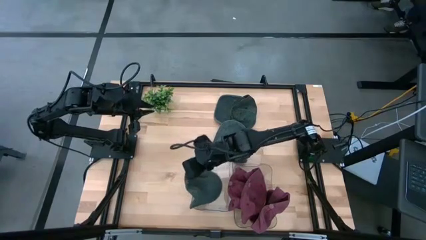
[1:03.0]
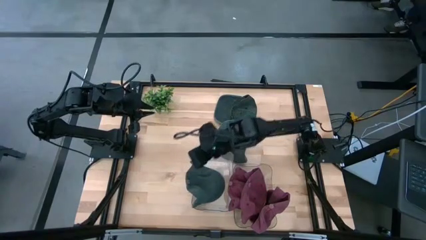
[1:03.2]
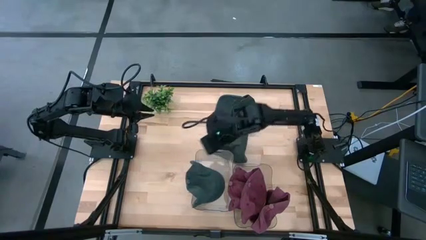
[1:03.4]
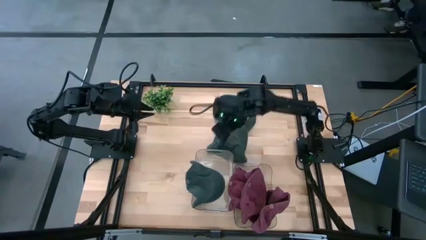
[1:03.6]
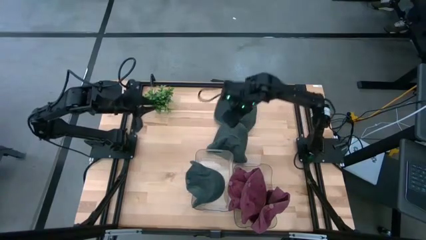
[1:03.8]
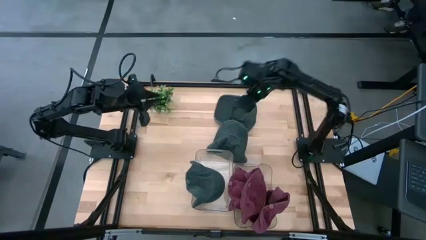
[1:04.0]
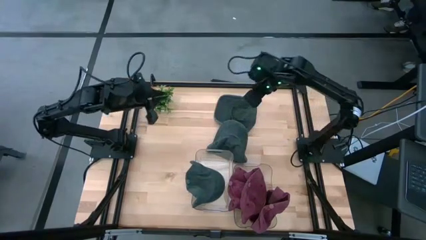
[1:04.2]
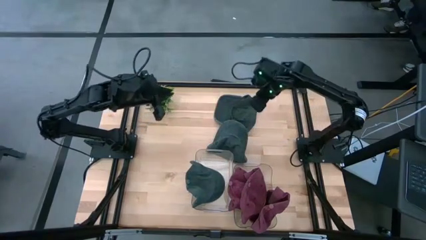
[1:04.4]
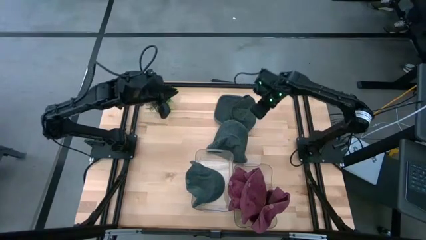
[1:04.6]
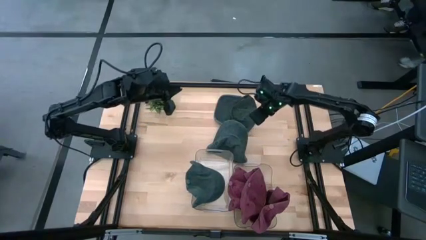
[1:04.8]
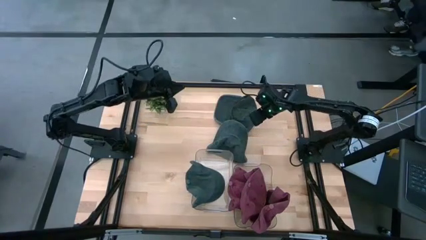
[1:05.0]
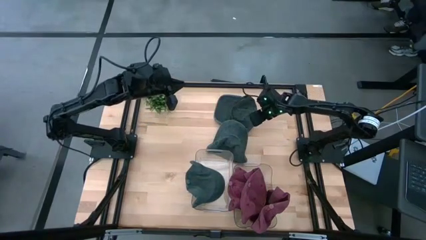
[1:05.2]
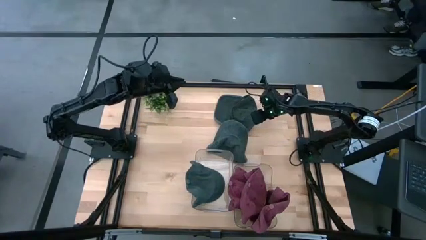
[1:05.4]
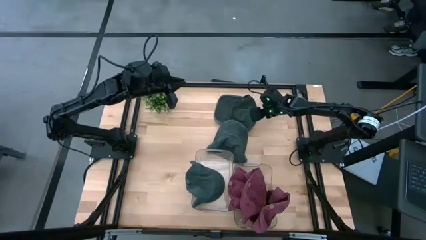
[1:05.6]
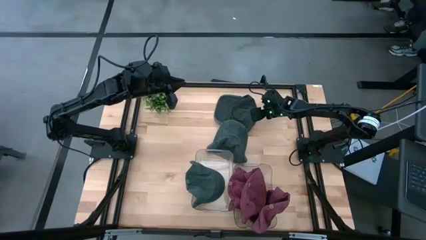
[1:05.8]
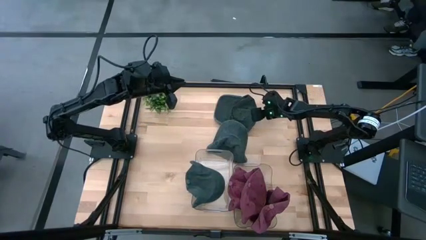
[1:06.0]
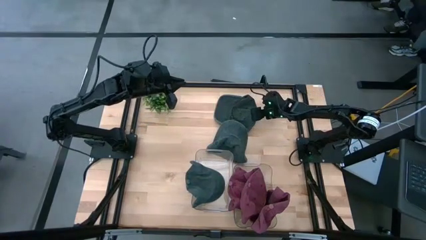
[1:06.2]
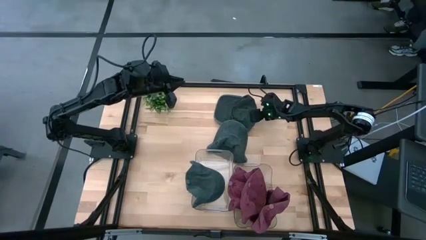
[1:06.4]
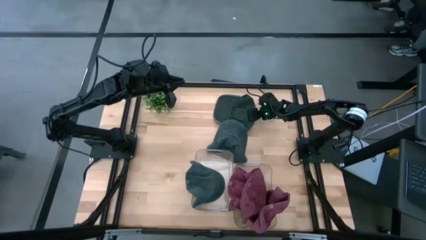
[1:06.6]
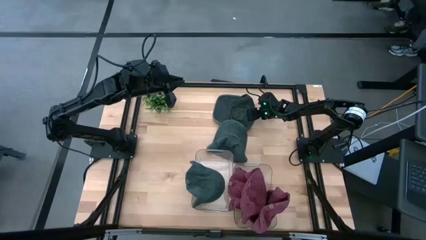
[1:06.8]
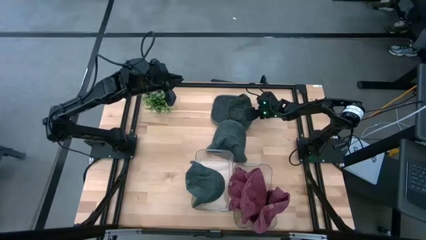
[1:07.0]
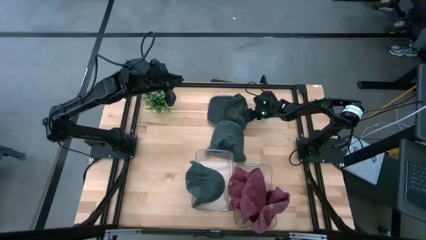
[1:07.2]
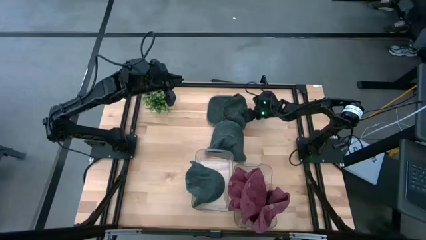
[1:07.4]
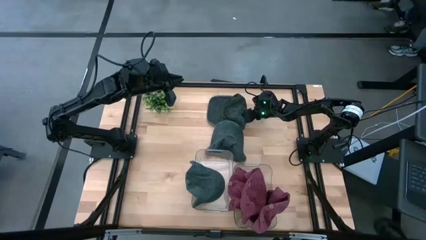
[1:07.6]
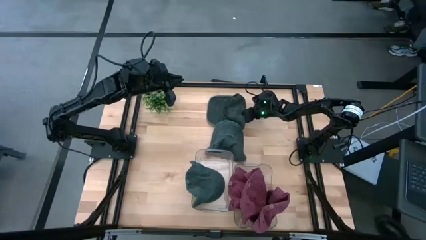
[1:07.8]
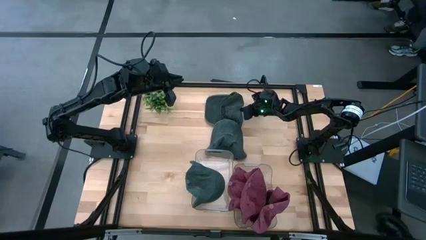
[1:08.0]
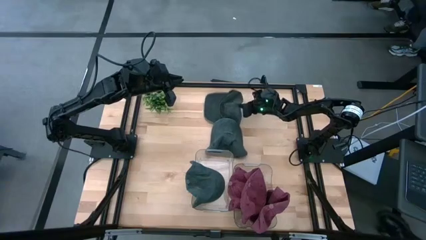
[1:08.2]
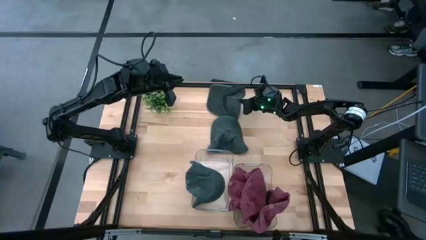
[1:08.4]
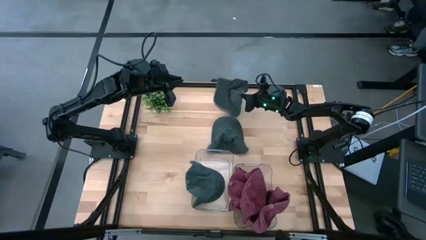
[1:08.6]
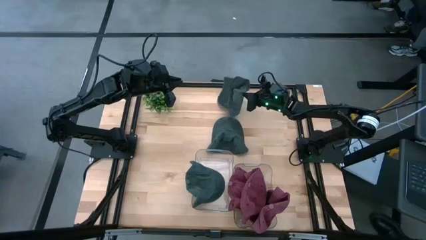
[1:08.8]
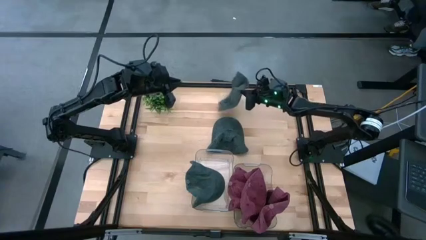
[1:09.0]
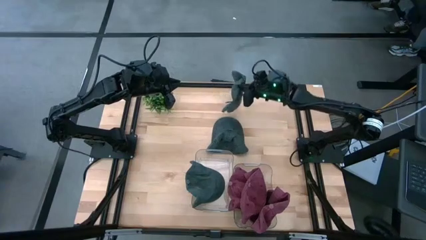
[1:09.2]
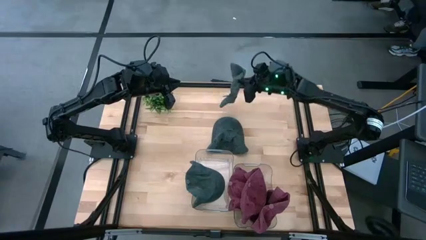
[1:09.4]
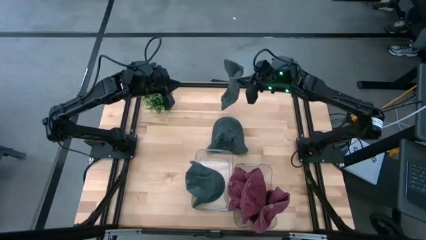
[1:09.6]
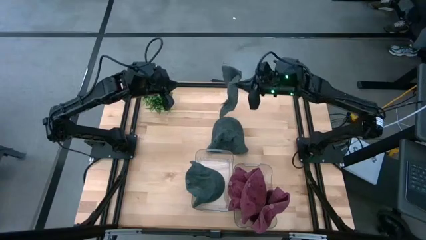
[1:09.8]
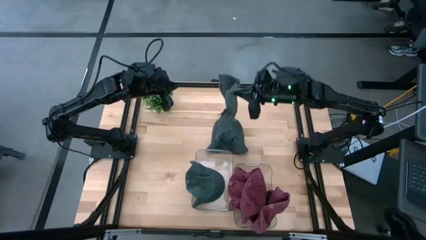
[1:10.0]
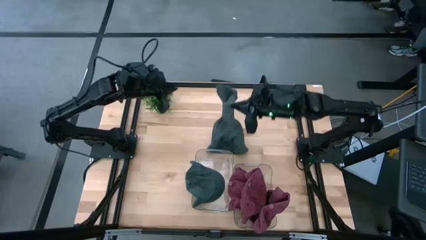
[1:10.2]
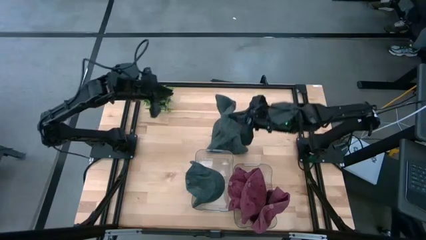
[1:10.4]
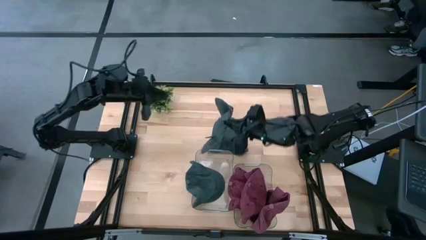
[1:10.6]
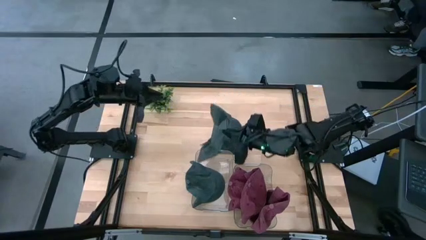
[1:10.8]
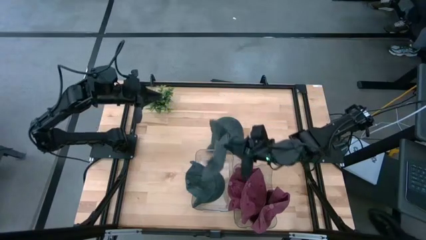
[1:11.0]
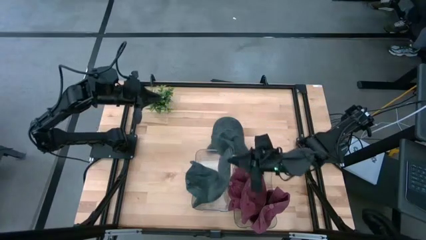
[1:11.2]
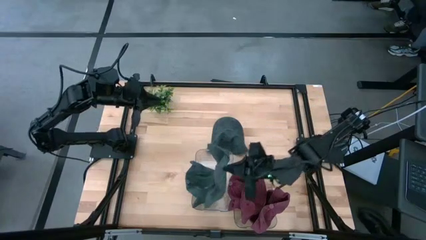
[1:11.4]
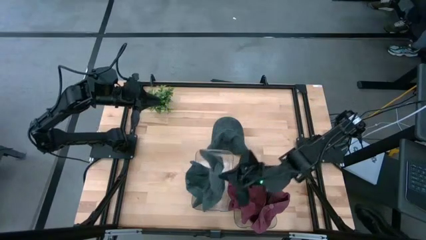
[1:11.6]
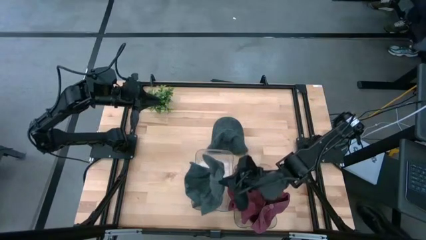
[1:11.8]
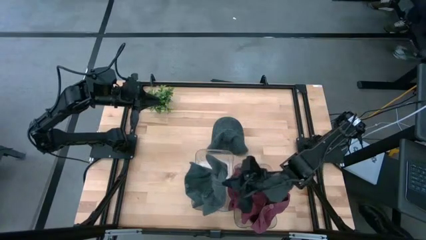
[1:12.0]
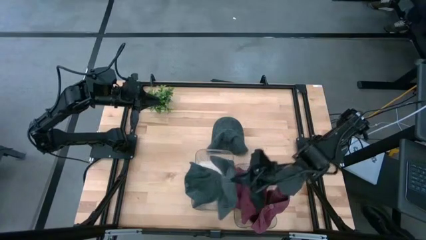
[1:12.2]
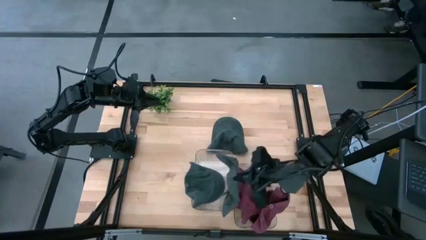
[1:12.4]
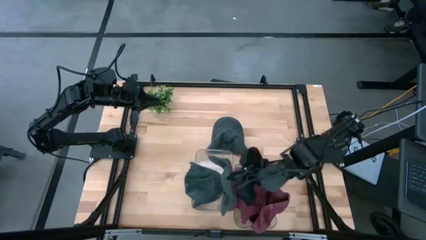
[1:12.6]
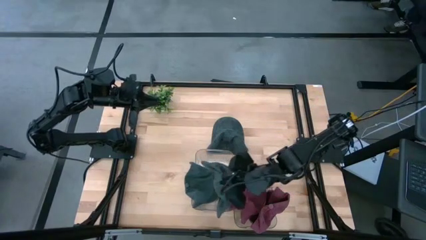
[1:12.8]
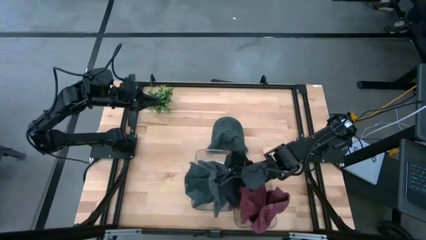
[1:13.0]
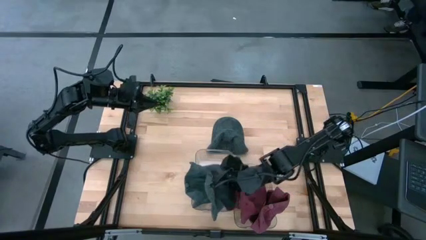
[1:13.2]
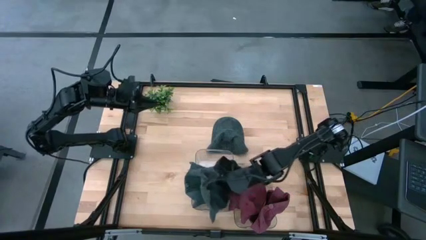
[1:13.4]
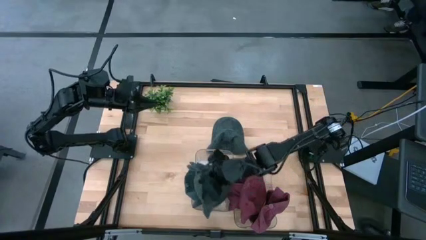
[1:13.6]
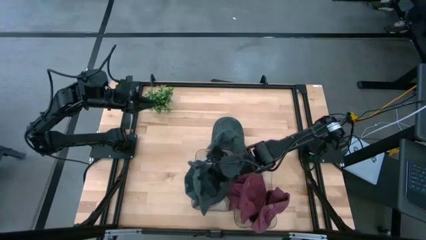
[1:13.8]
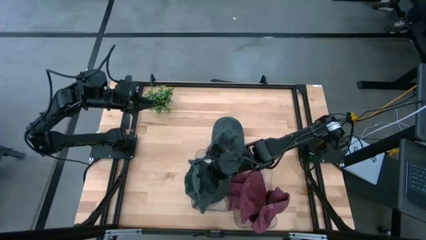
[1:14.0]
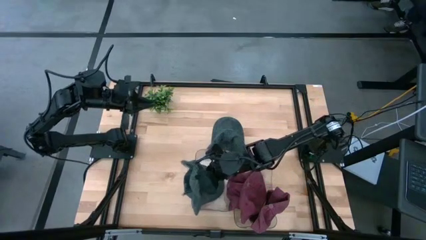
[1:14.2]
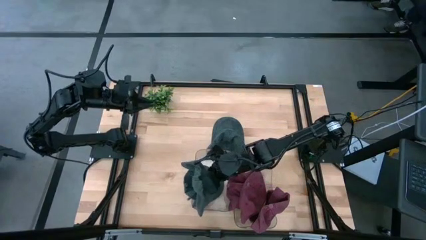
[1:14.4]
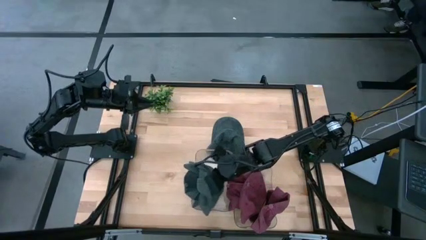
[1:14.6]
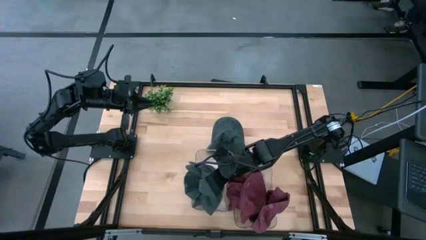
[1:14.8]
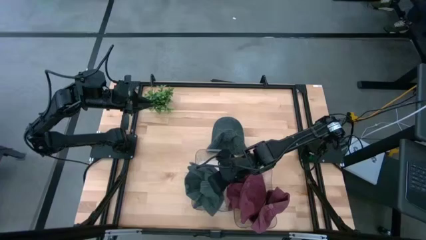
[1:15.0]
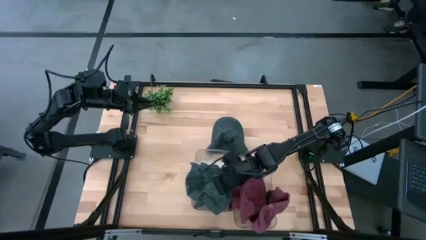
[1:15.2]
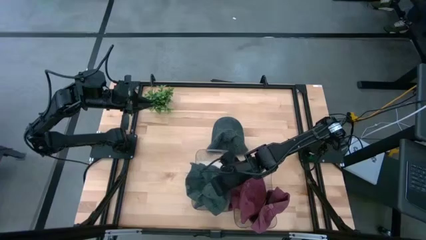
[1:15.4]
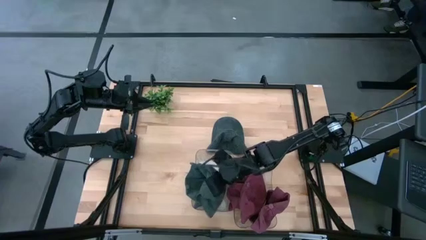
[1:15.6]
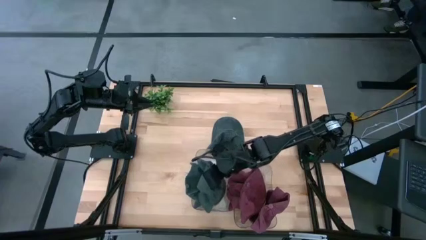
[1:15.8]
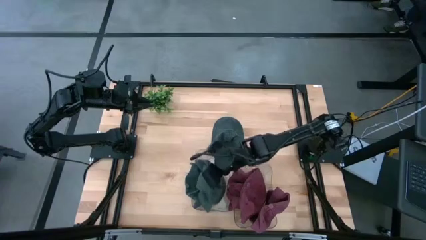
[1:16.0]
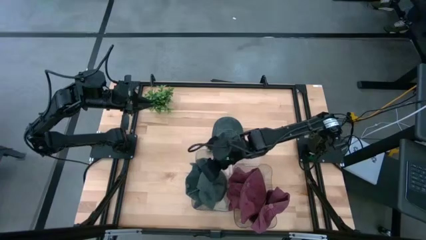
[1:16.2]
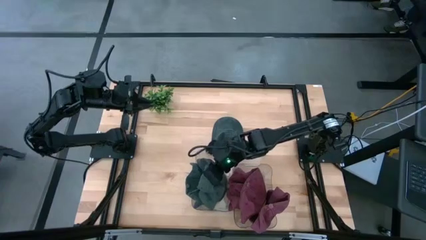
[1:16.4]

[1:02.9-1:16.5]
Task: Pick & Place hat
Put the top gray cap into the left transparent bin

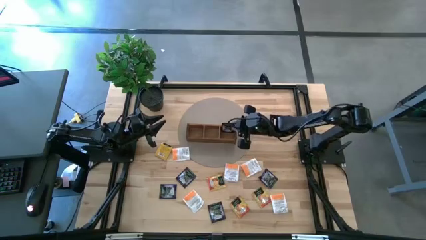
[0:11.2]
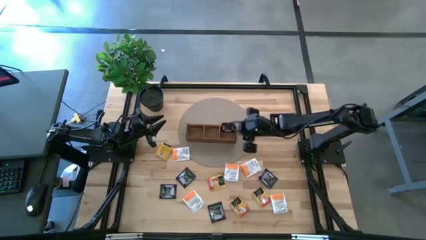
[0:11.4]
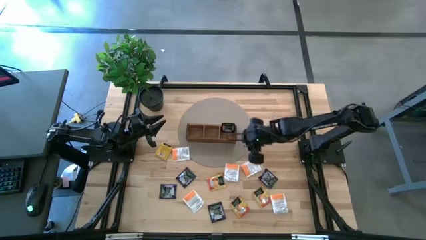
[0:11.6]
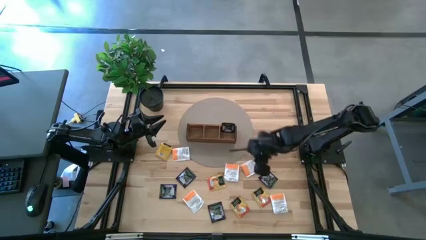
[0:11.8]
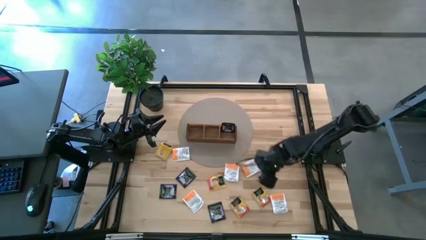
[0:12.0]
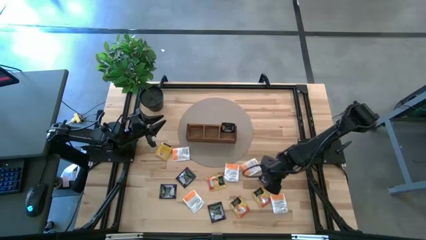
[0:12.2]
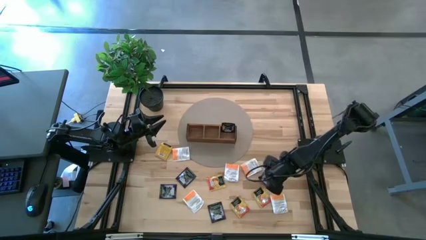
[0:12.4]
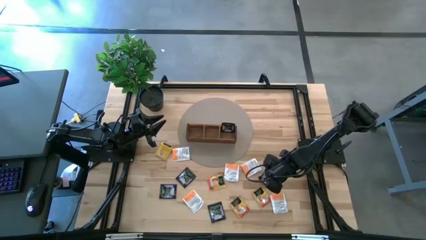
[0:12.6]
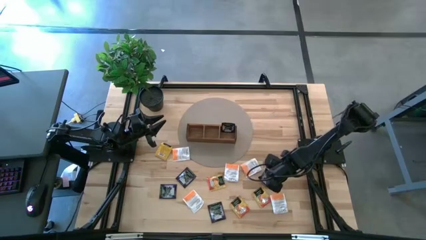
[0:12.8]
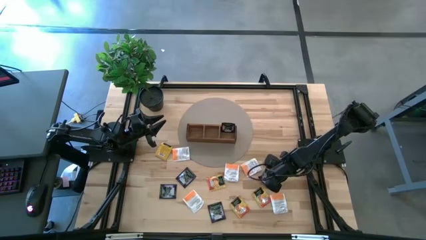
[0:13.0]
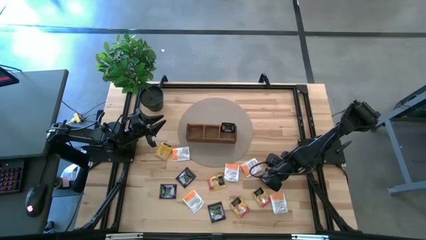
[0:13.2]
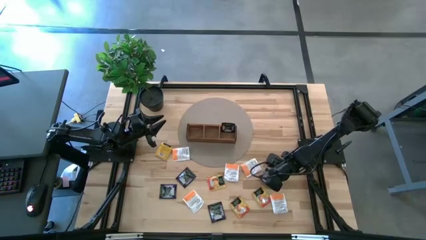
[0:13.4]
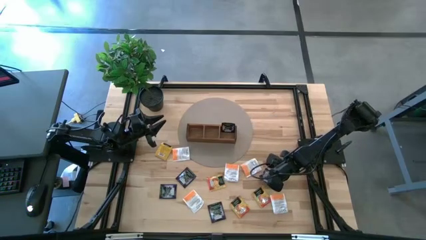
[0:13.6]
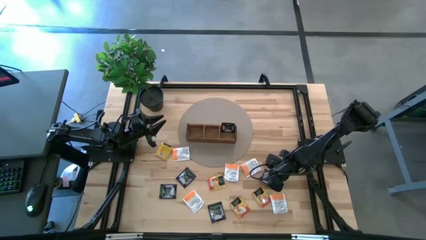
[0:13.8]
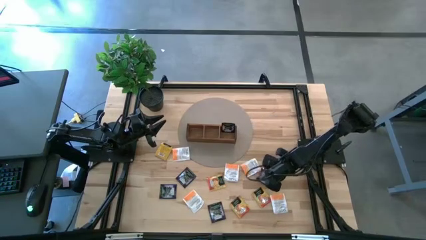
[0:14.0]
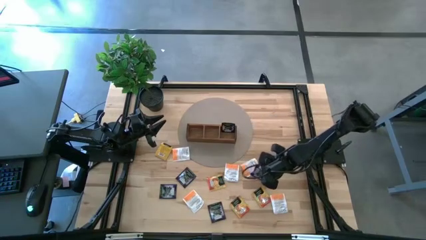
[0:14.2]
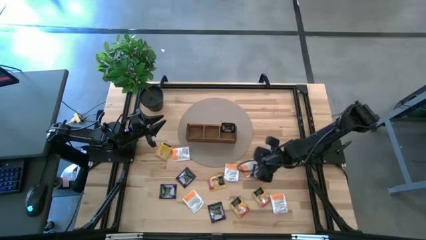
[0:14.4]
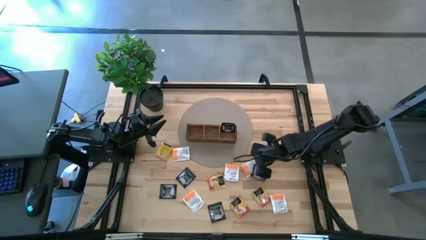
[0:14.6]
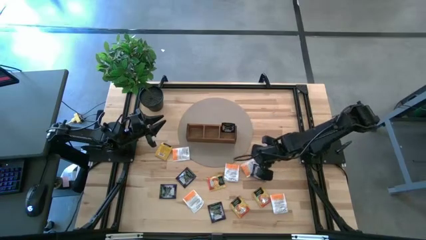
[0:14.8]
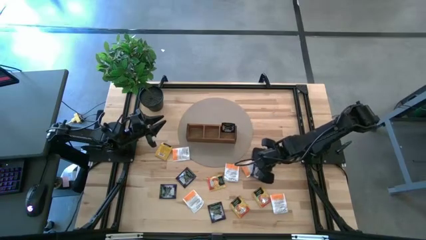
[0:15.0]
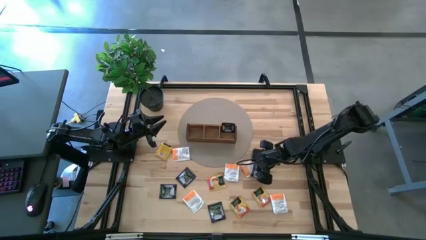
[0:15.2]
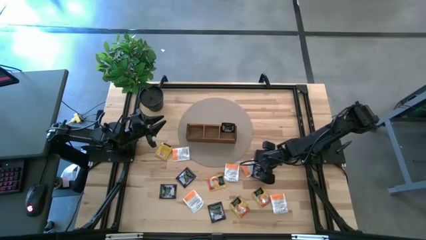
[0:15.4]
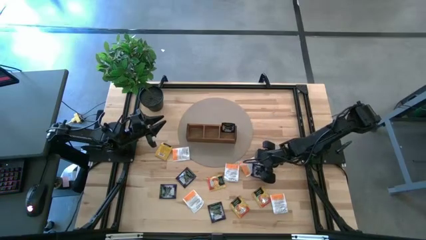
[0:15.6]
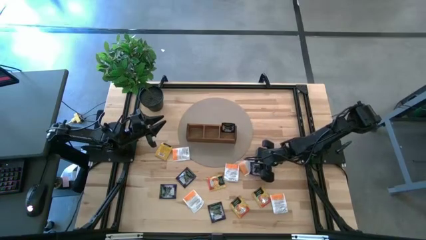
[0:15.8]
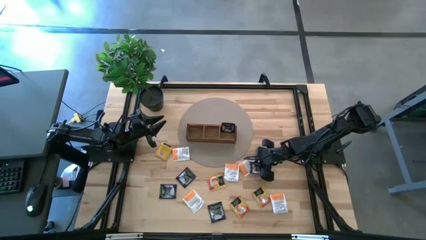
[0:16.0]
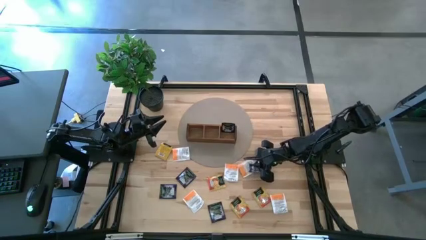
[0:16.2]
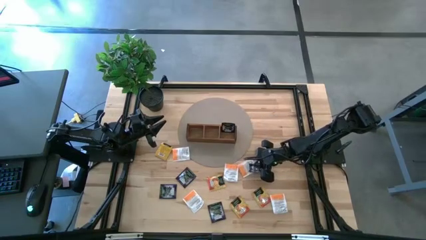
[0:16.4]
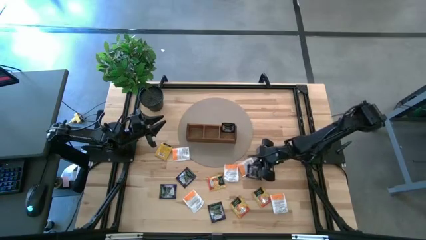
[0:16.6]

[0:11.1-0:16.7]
Task: Pick & Place Tea
Put the purple tea bag into the right section of the wooden organizer
